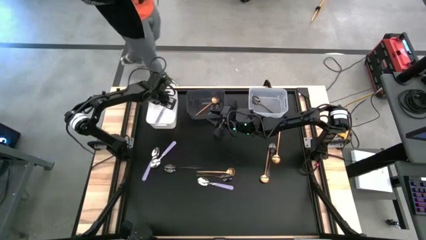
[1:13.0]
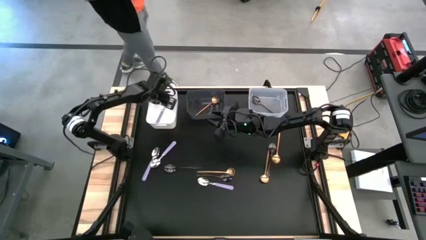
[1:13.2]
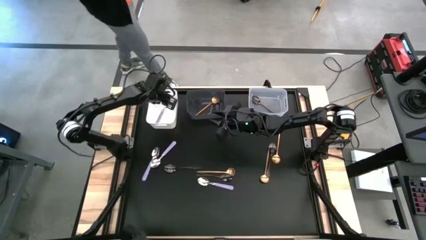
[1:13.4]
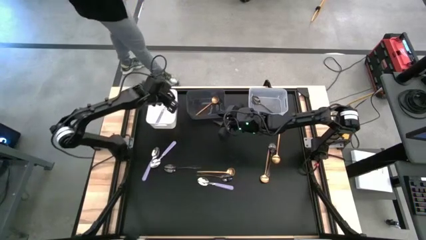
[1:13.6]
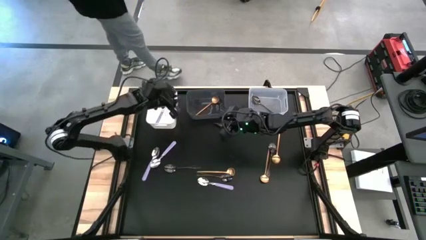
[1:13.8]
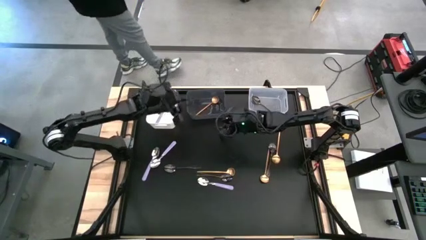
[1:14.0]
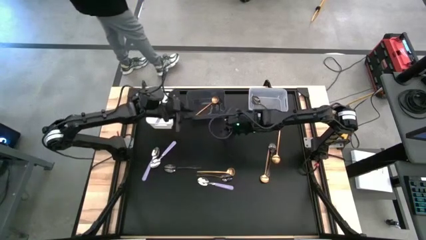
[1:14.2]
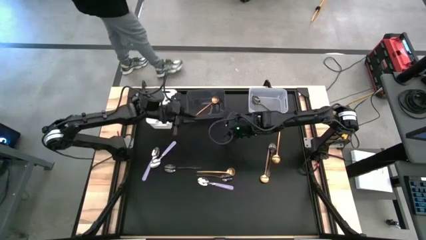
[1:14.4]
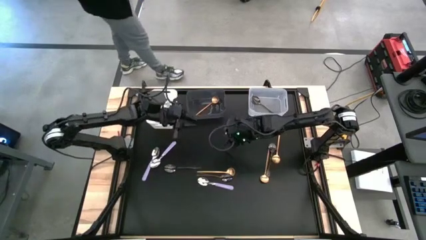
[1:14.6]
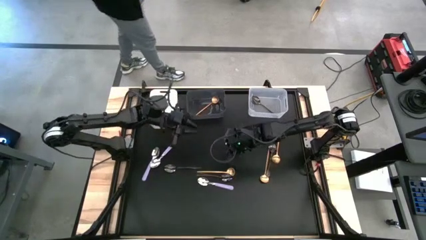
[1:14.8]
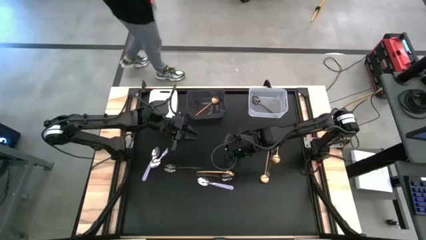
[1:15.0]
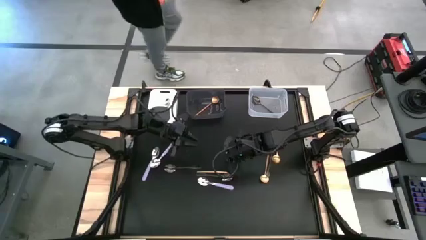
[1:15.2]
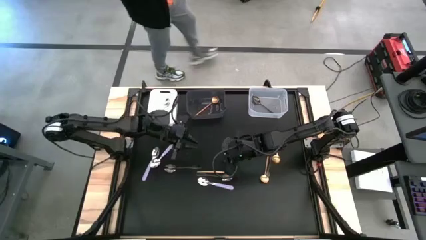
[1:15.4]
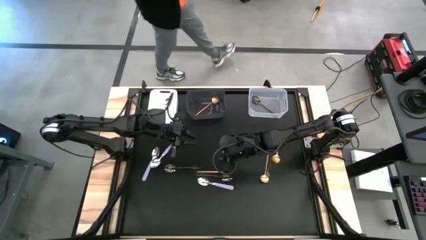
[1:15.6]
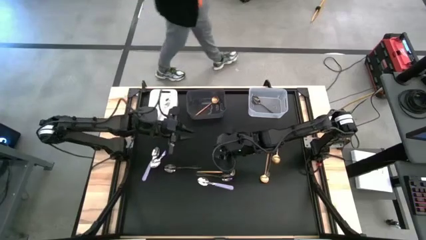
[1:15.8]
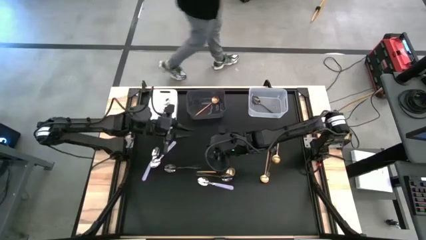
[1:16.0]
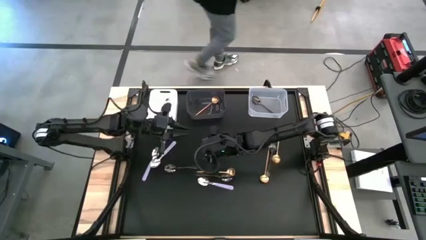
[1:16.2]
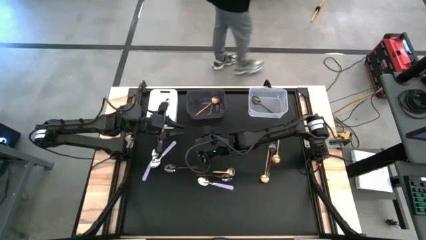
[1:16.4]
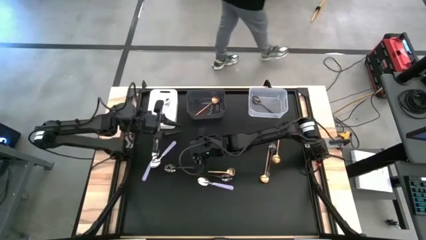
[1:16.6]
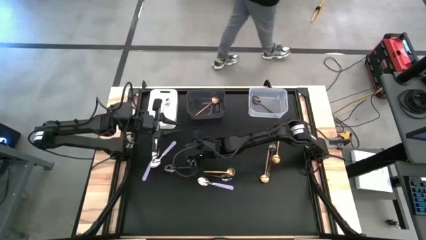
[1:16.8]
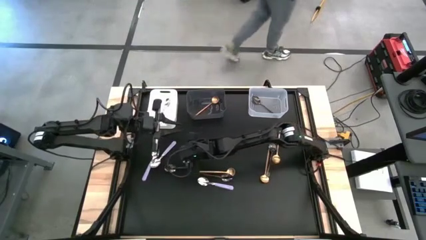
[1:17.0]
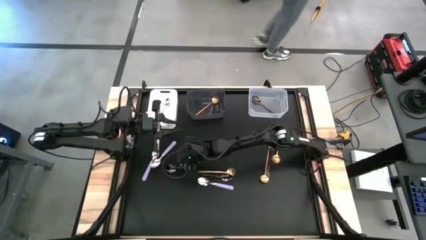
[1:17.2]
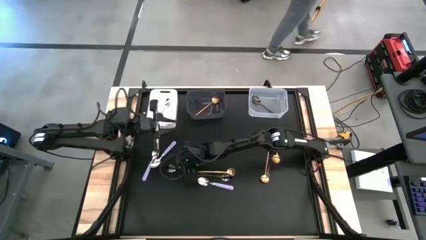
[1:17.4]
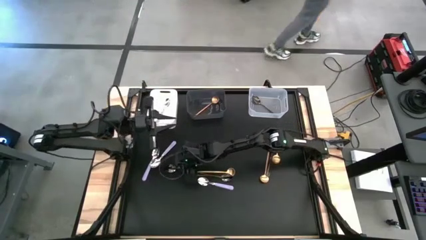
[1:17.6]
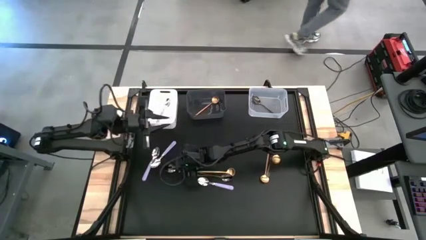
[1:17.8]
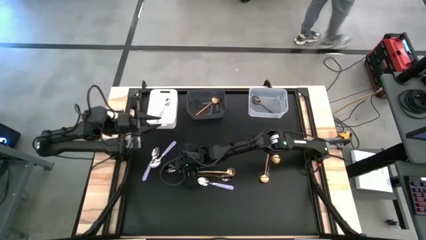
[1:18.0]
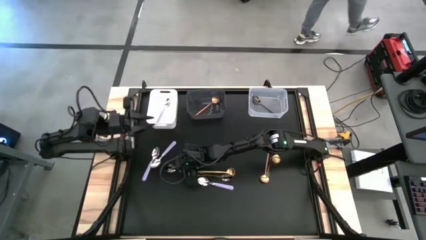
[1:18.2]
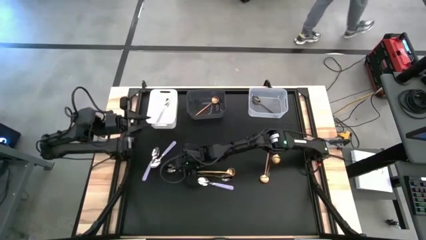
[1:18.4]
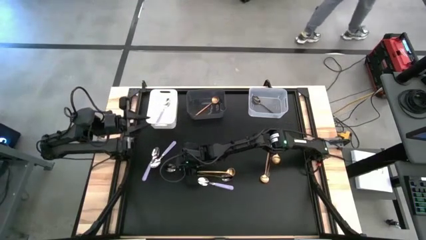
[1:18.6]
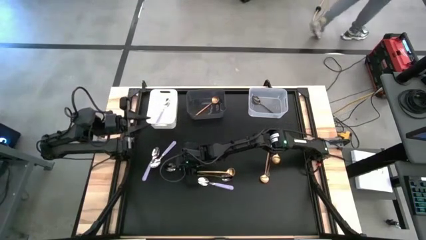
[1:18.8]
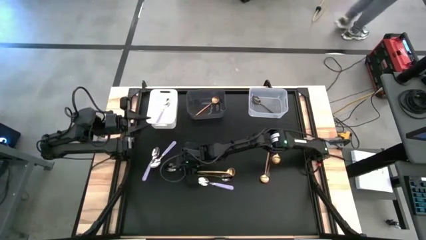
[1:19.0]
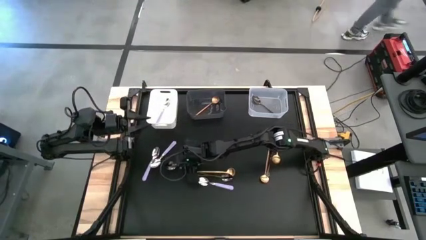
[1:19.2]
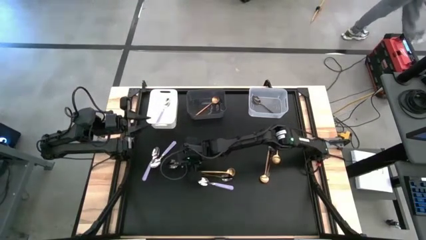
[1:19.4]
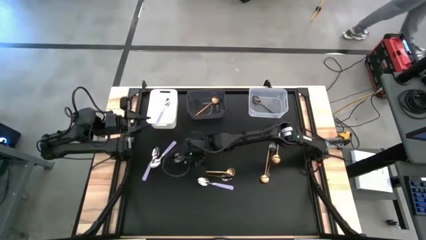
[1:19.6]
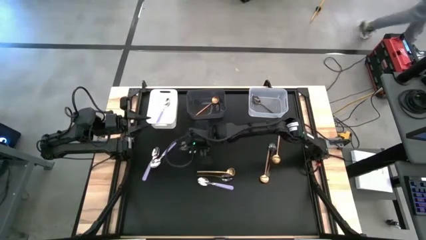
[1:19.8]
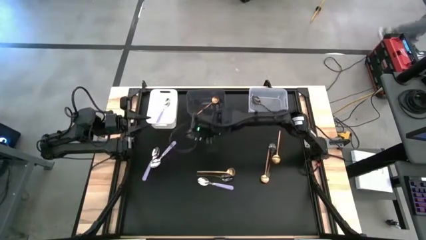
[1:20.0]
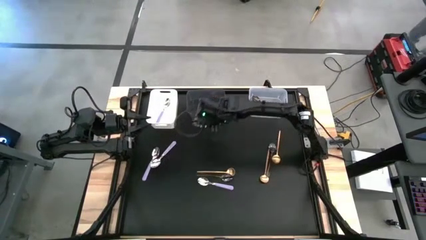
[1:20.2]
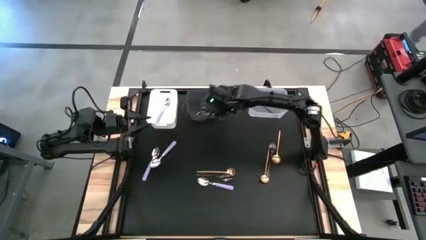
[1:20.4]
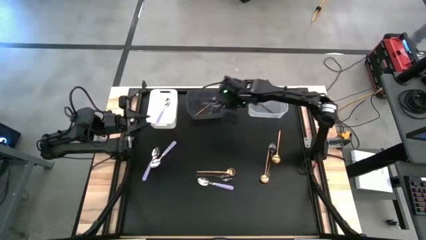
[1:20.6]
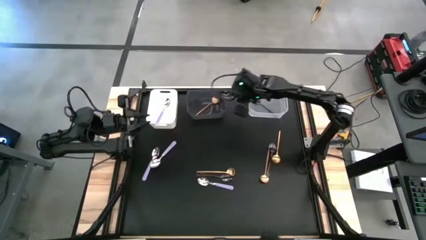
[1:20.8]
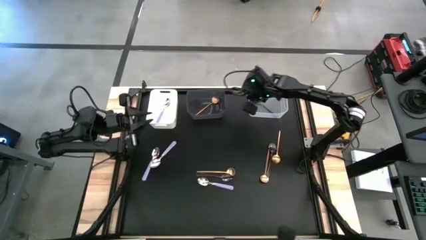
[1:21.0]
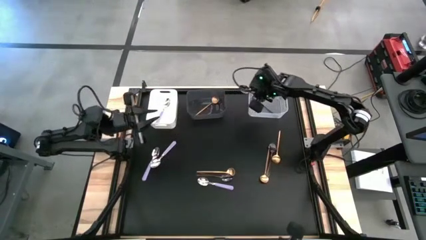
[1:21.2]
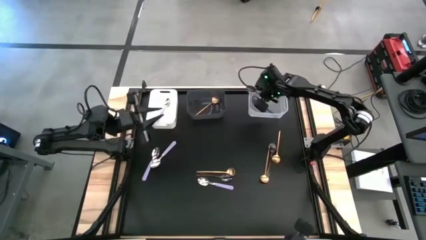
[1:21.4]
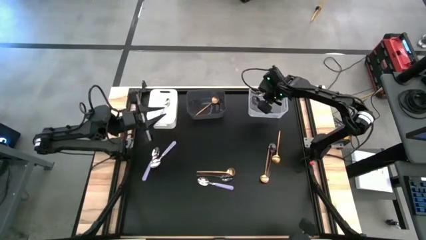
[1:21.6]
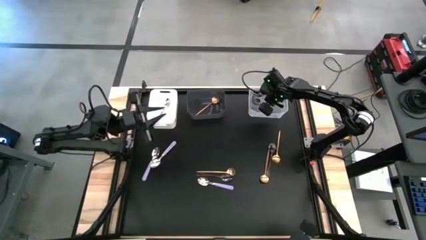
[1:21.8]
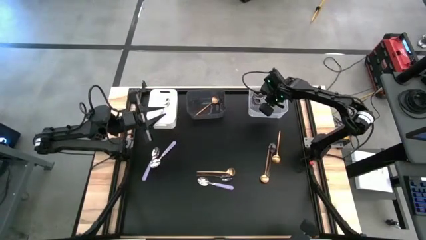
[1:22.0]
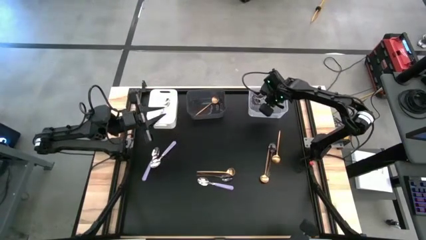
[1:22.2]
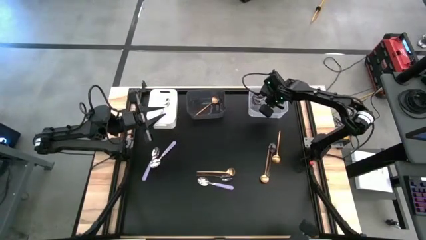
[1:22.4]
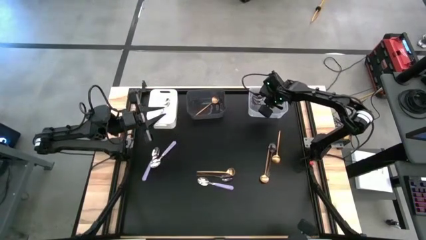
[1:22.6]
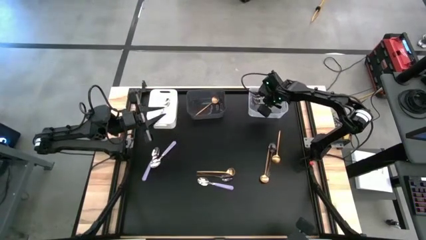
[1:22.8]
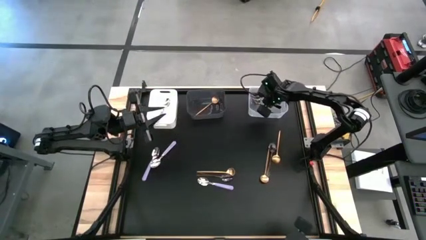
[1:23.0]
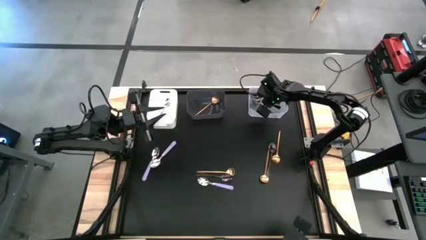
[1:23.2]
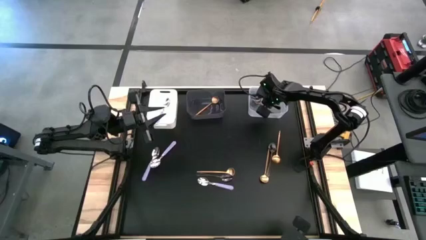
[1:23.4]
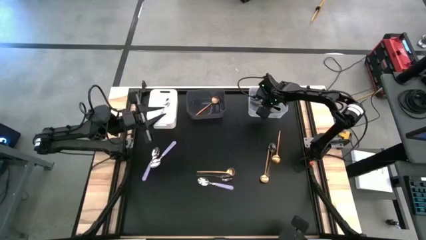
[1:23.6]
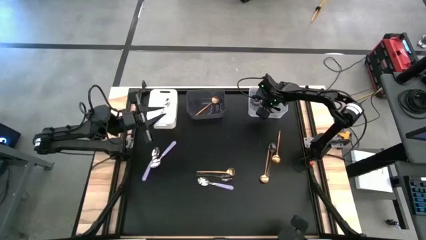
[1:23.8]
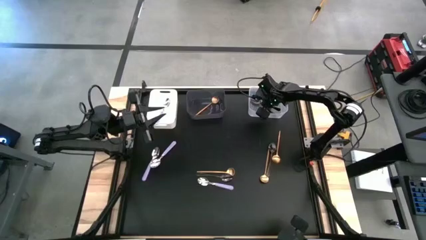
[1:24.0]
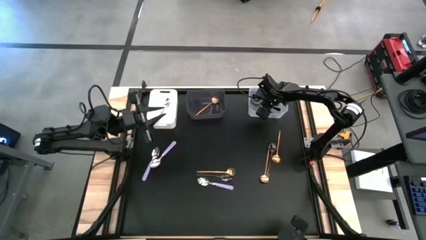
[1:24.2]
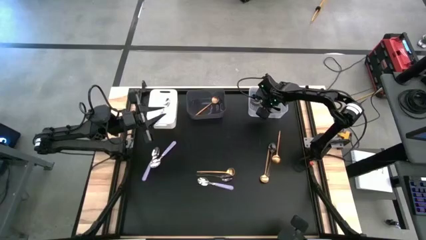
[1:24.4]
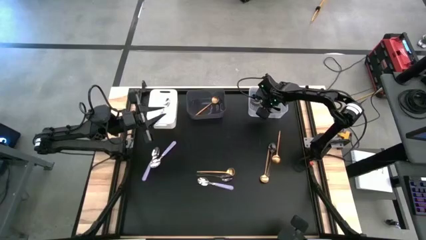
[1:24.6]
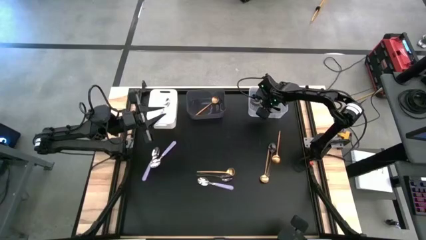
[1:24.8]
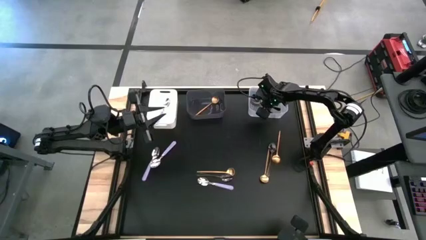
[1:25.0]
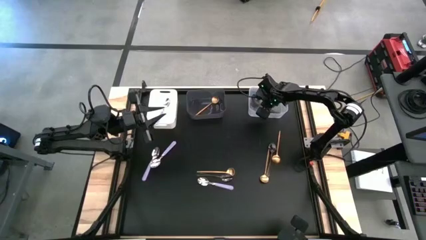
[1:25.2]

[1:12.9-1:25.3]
Task: Sort silverware by color (type)
Put the black spoon into the transparent bin
